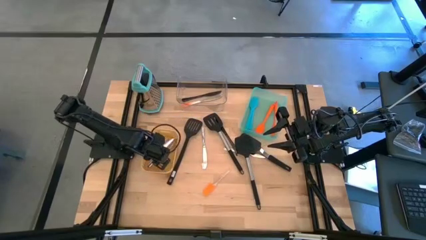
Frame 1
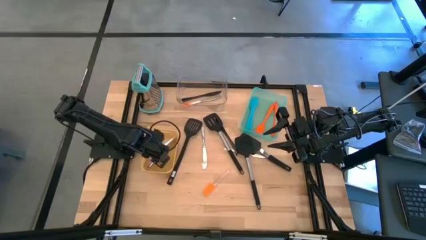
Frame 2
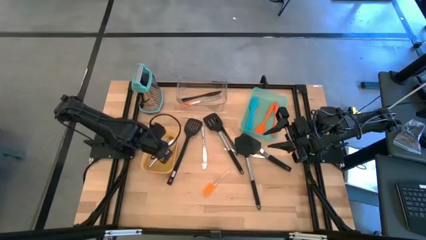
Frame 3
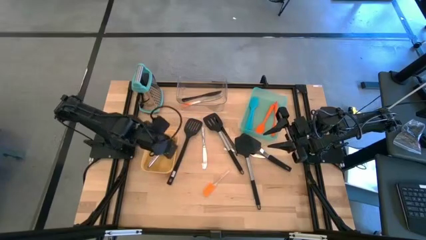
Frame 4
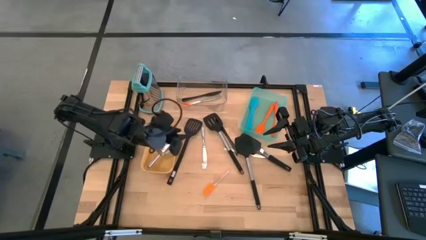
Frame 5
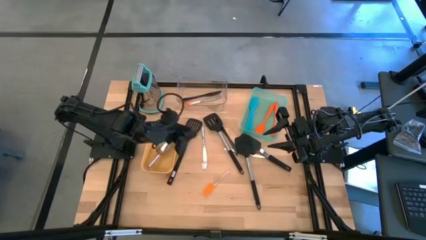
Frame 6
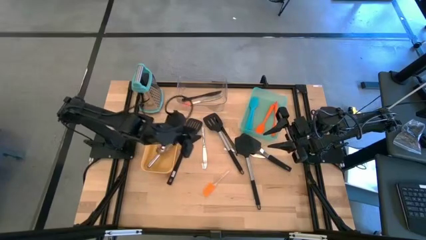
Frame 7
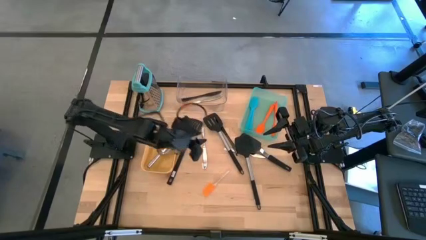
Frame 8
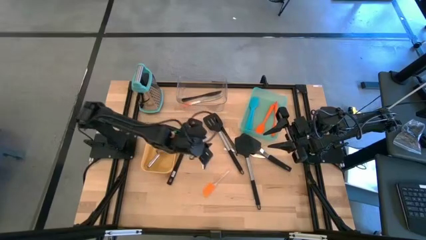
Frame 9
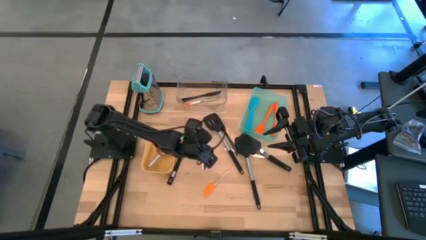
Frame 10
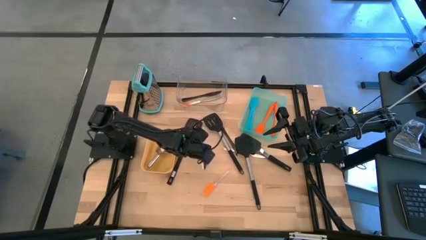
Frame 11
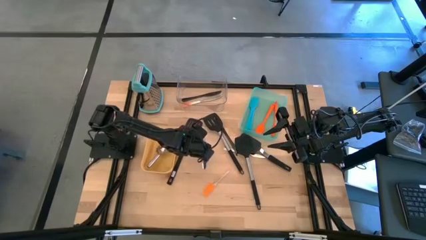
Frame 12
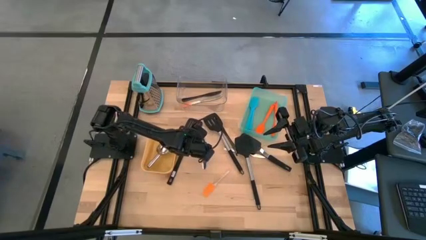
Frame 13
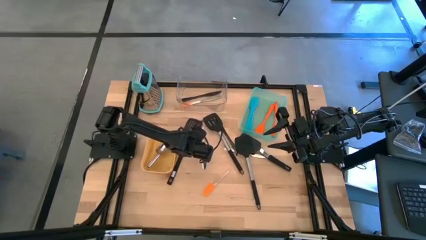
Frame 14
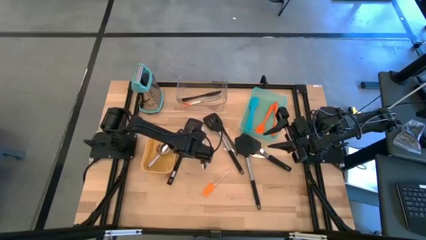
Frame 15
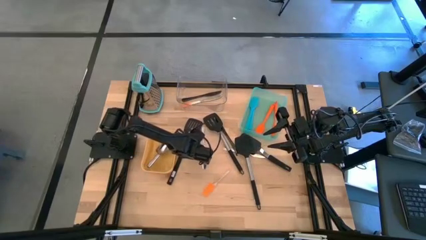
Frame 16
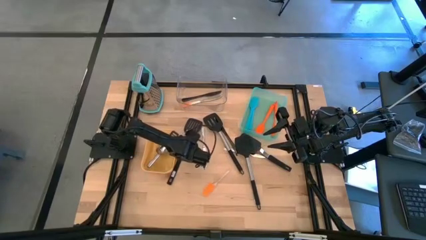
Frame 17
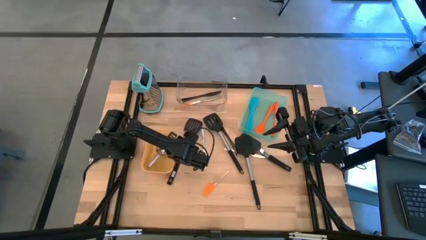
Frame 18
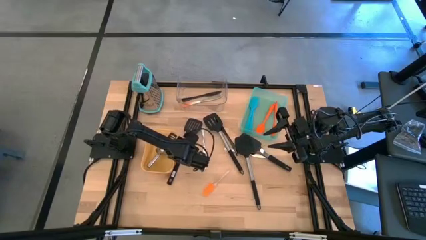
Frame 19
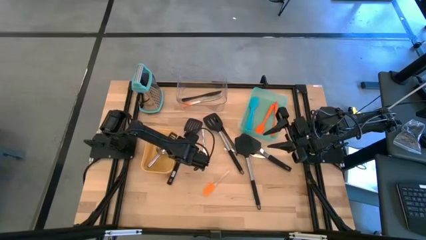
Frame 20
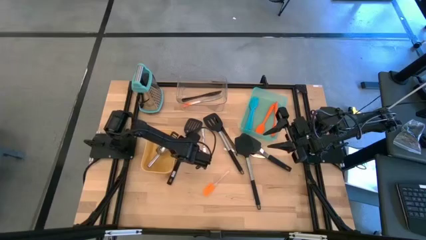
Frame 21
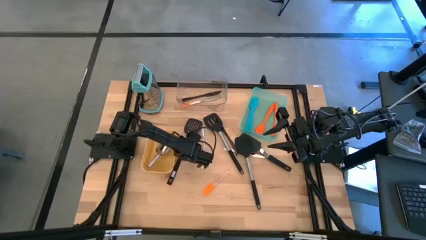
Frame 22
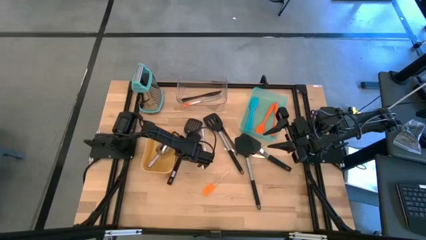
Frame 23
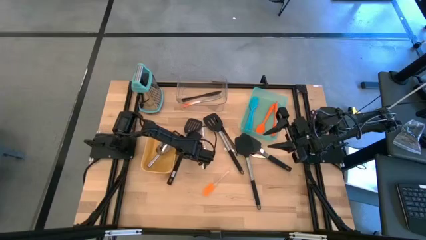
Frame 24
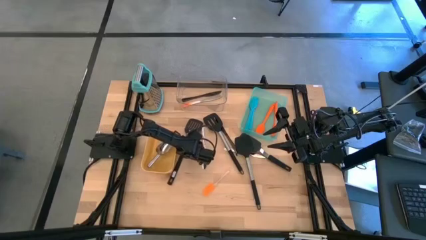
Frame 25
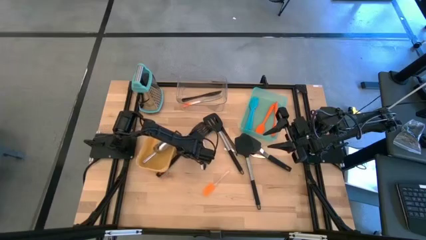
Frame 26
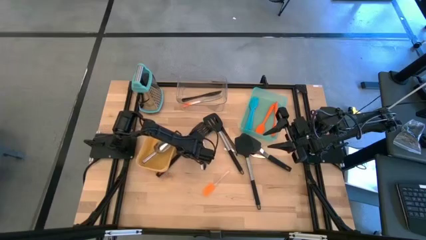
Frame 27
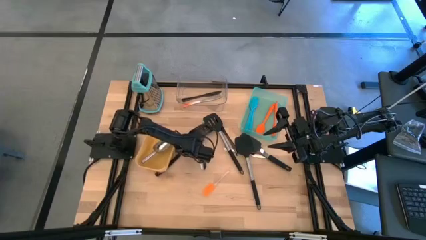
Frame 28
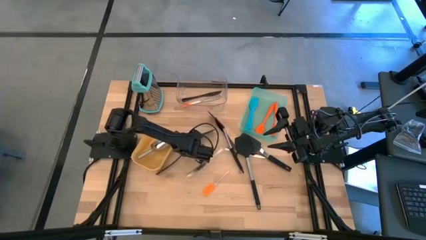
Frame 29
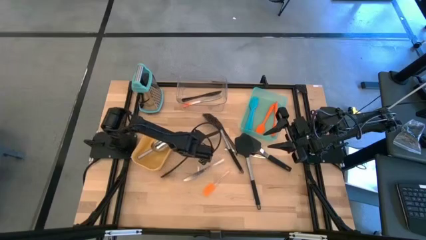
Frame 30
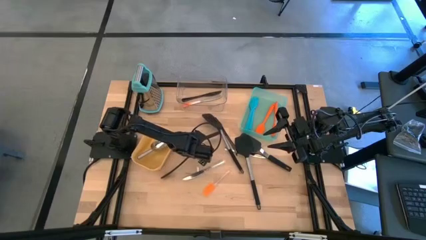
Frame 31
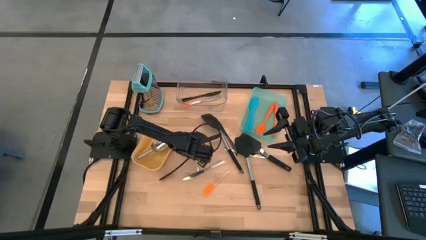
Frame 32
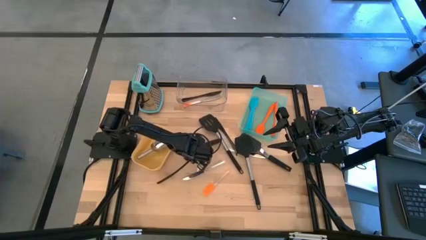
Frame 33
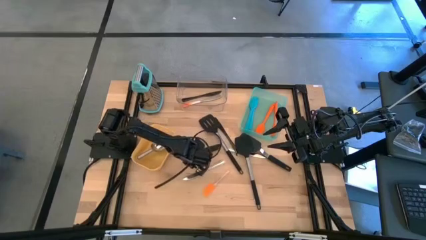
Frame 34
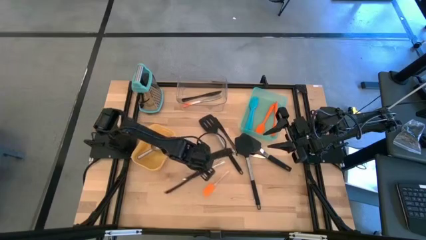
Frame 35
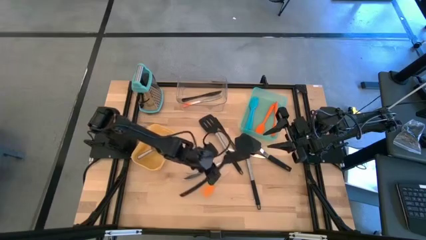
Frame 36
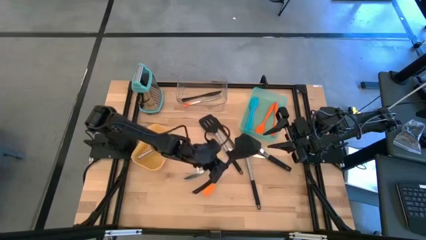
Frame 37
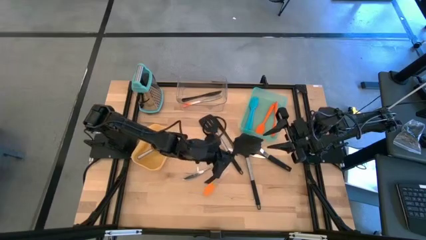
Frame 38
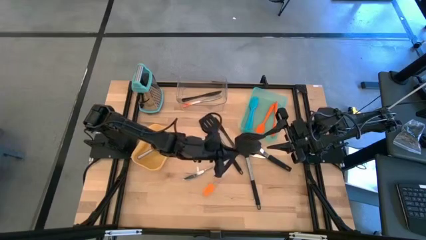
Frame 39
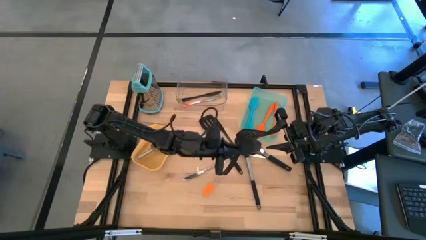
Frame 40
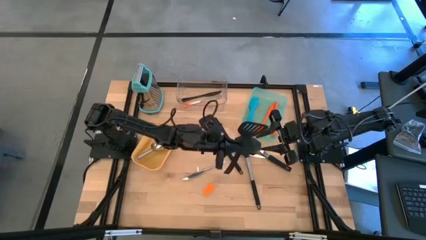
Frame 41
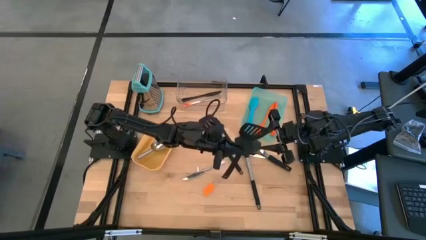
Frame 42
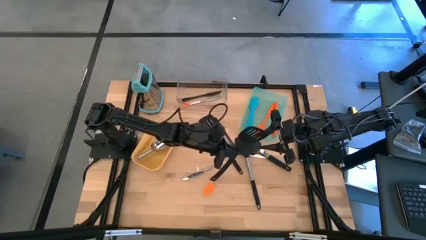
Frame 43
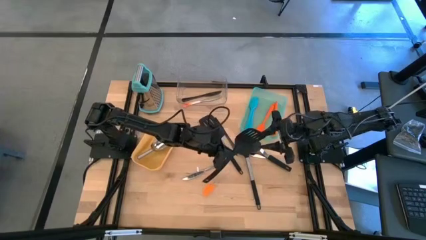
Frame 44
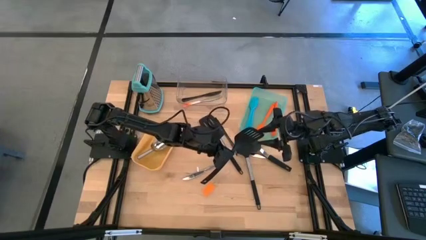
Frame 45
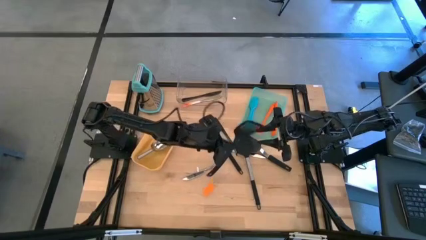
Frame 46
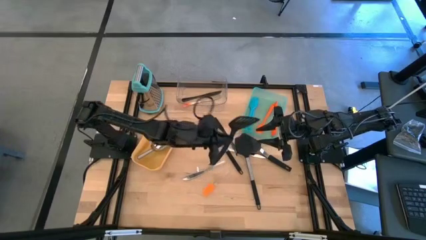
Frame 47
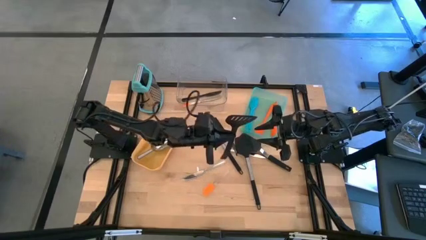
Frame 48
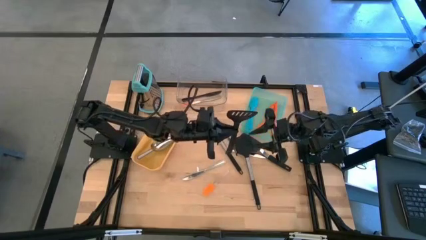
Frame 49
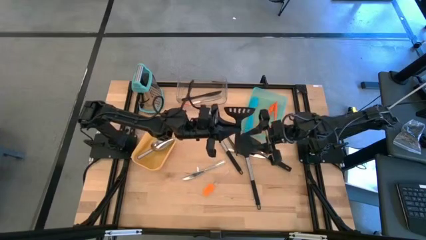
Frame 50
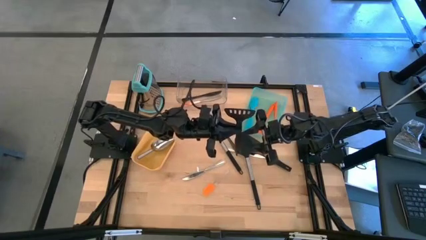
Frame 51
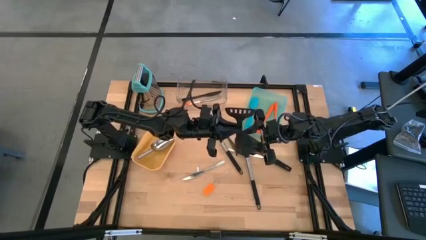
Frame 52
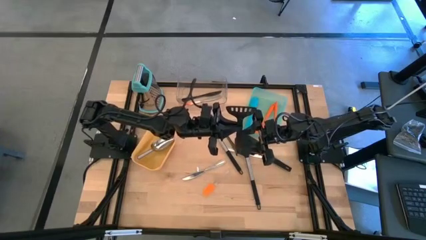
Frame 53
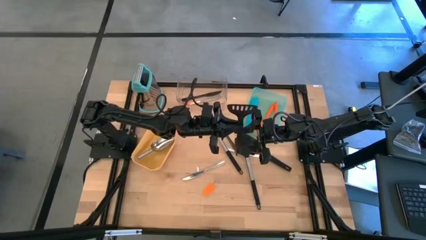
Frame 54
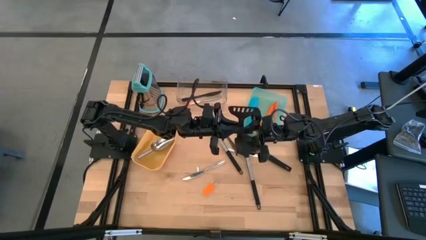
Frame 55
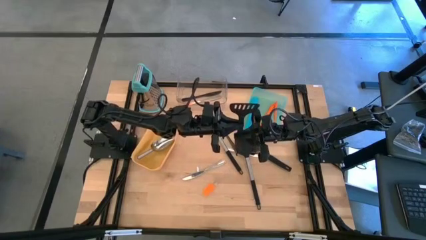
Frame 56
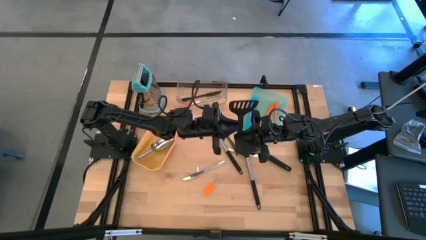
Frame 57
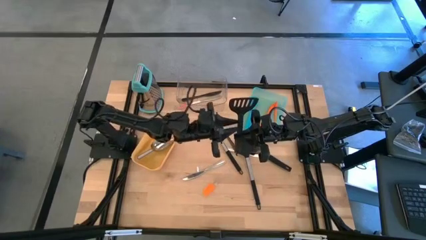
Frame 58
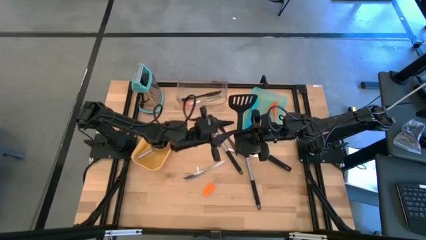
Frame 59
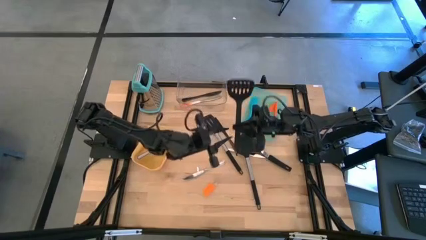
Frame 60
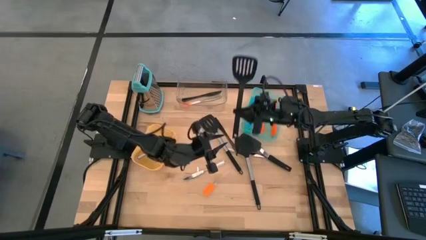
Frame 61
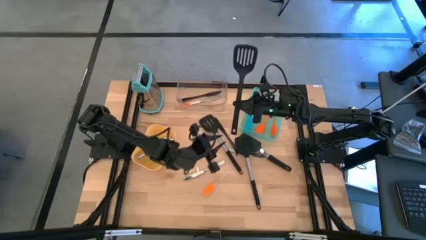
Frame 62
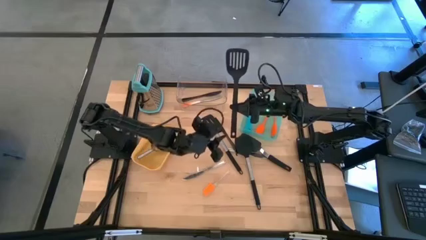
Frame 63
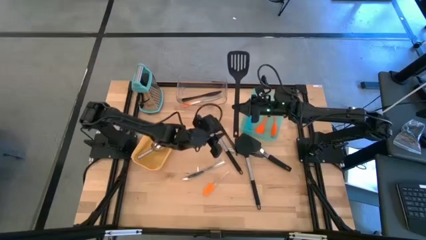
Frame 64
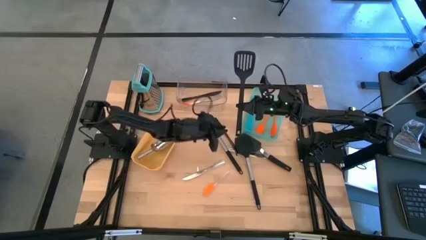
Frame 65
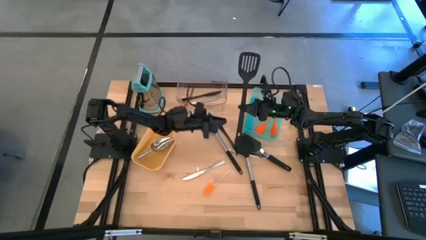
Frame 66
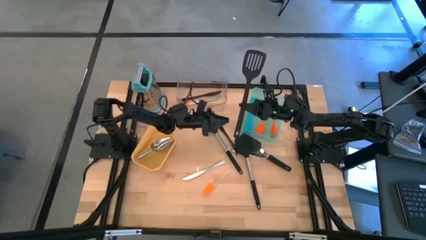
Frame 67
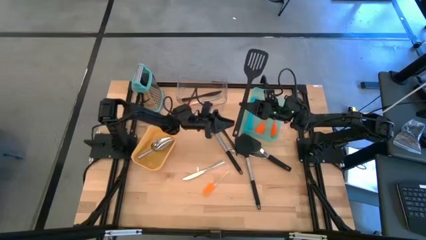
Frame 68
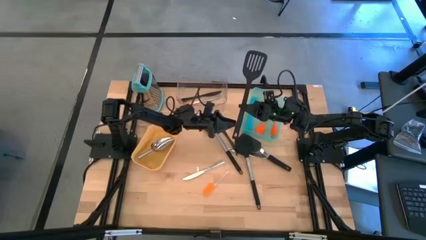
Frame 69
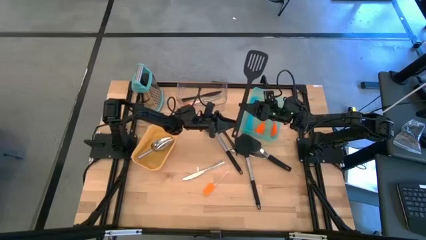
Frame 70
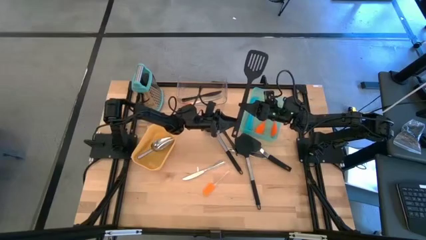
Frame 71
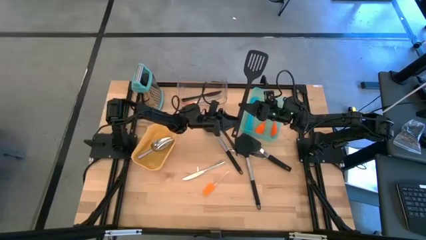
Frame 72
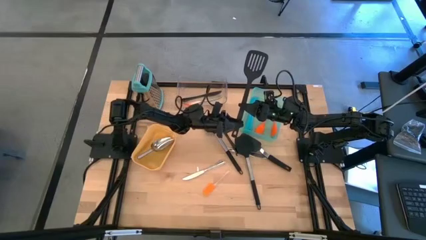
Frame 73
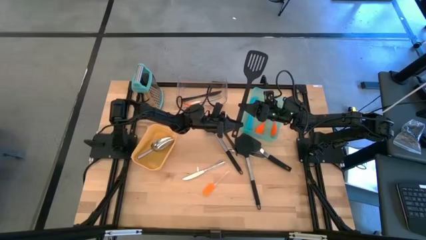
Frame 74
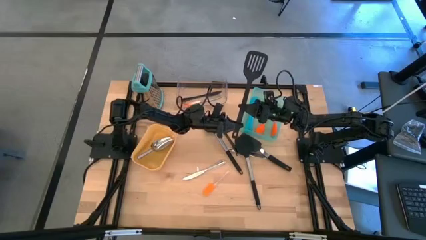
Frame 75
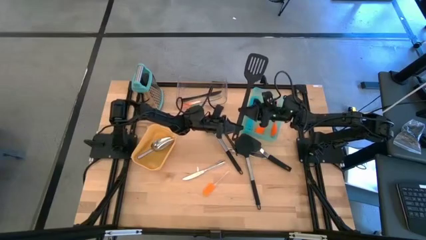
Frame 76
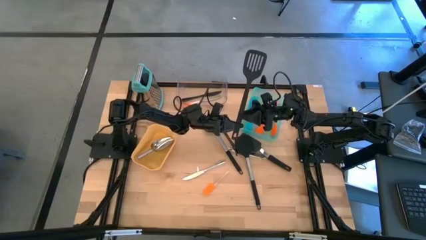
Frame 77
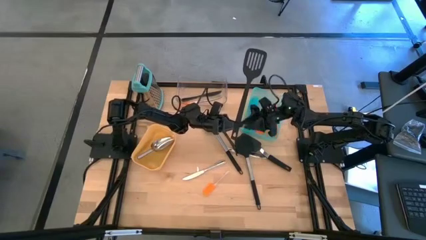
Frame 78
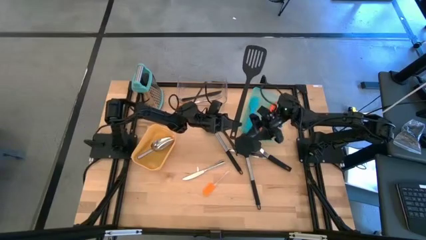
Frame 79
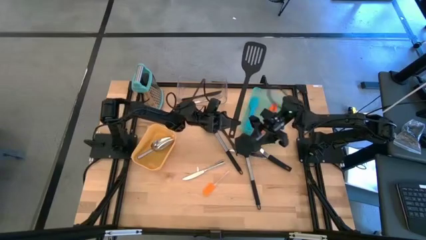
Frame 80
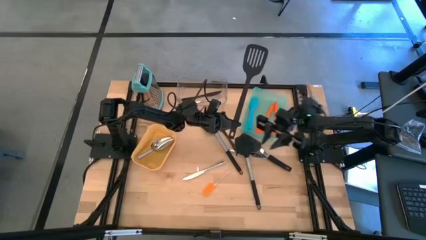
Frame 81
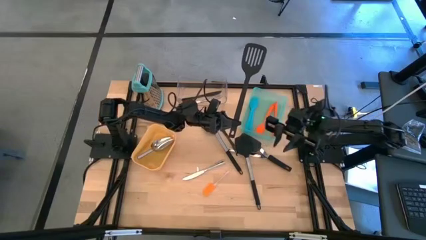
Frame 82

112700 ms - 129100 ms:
Task: Pick & Place Kitchen Items
Put the black slotted spatula into the green bin
